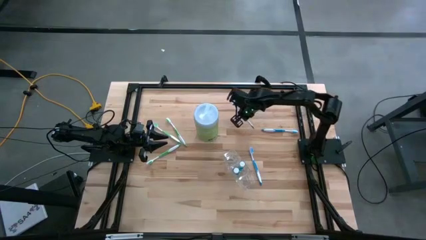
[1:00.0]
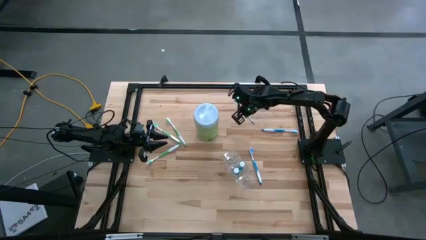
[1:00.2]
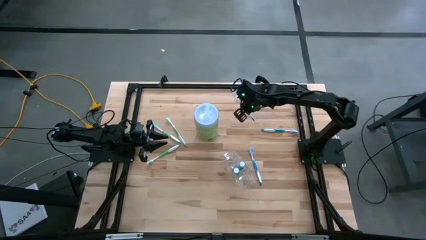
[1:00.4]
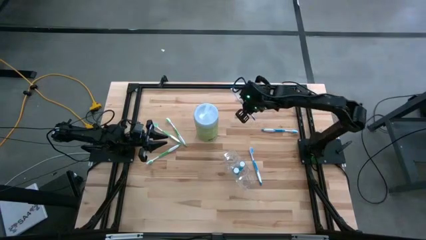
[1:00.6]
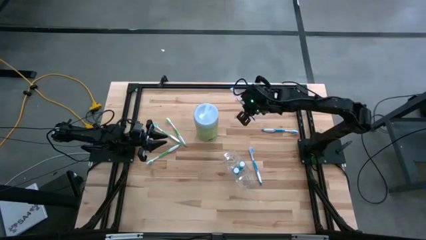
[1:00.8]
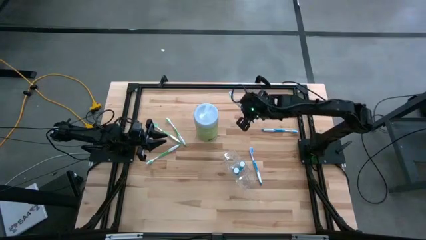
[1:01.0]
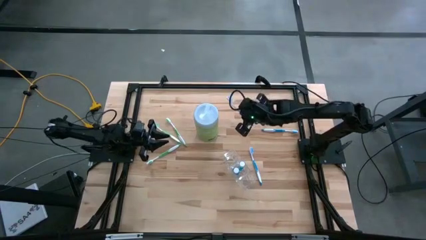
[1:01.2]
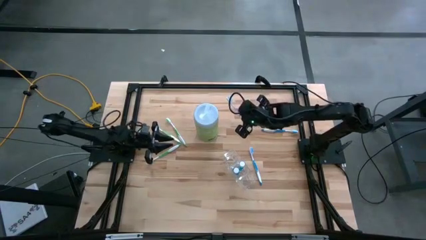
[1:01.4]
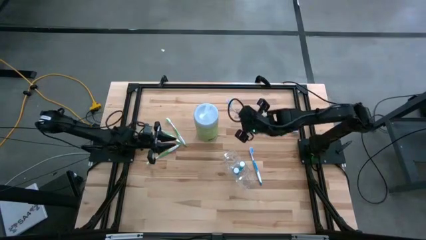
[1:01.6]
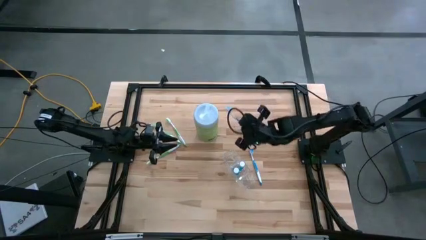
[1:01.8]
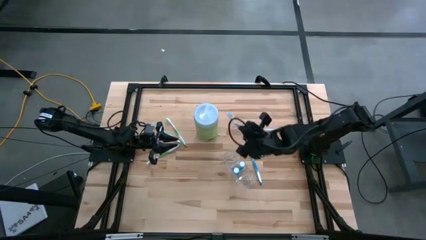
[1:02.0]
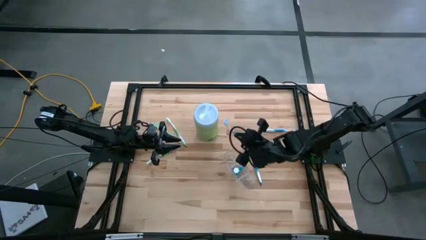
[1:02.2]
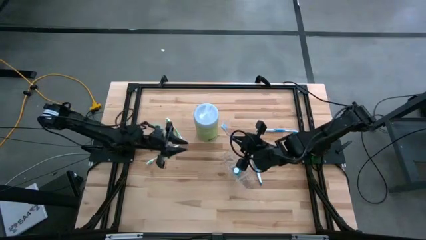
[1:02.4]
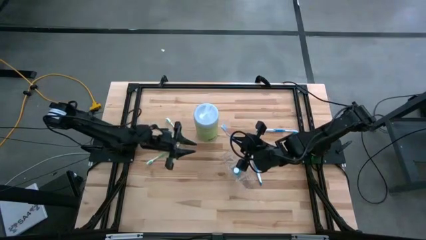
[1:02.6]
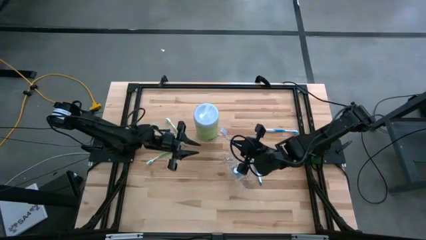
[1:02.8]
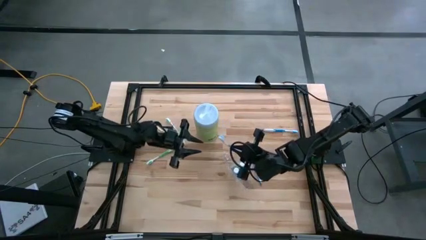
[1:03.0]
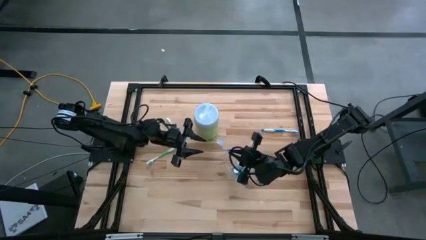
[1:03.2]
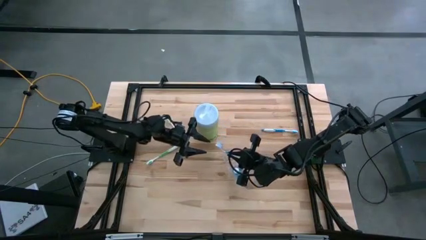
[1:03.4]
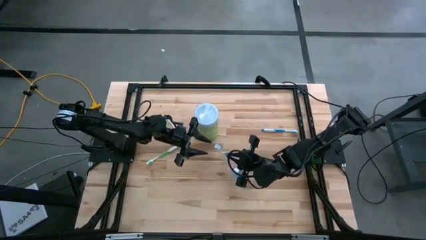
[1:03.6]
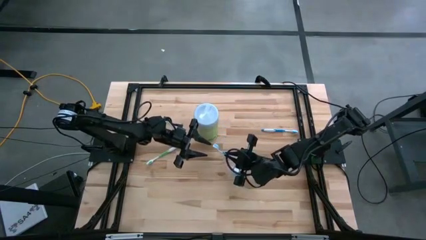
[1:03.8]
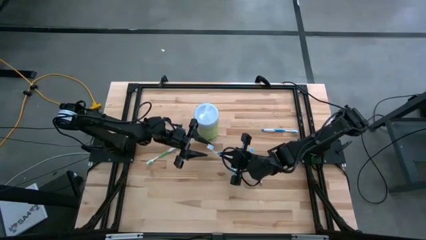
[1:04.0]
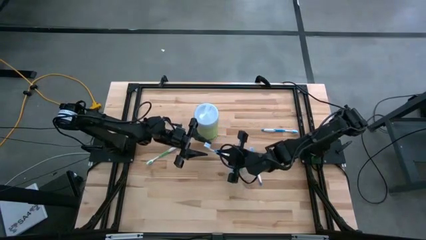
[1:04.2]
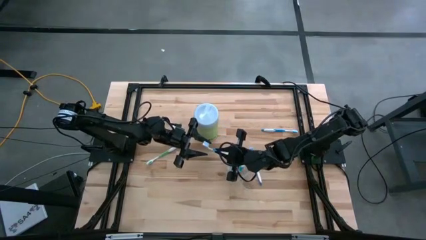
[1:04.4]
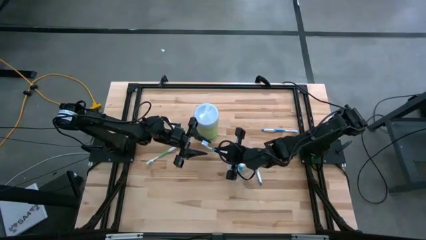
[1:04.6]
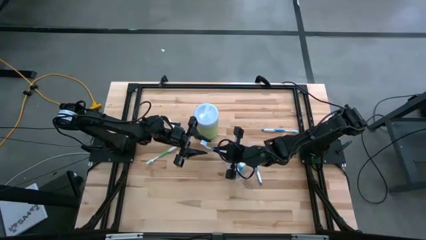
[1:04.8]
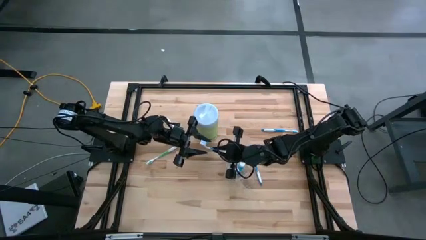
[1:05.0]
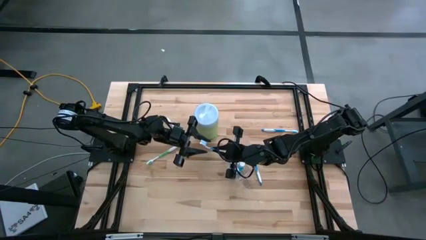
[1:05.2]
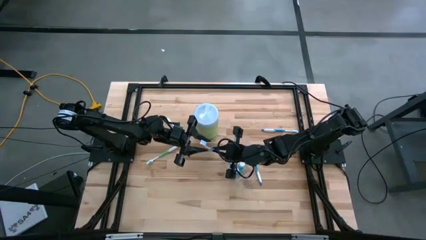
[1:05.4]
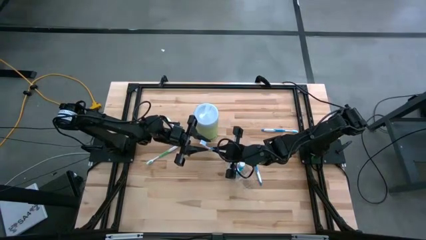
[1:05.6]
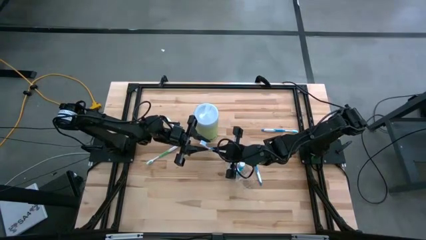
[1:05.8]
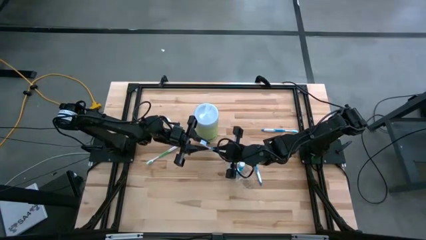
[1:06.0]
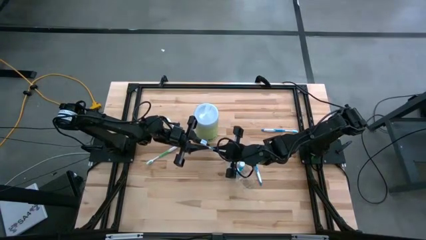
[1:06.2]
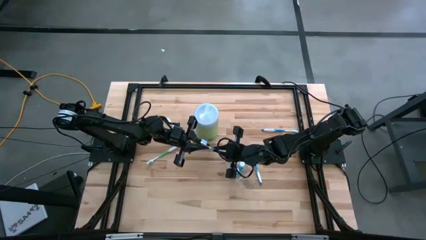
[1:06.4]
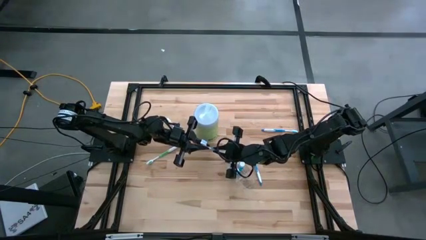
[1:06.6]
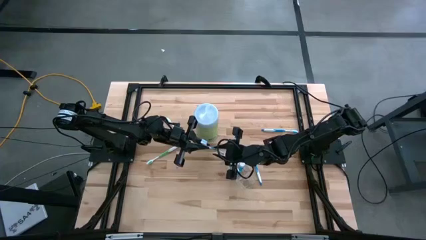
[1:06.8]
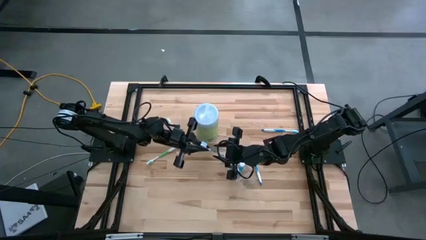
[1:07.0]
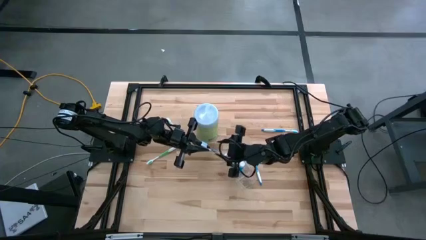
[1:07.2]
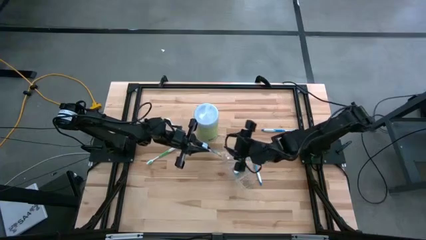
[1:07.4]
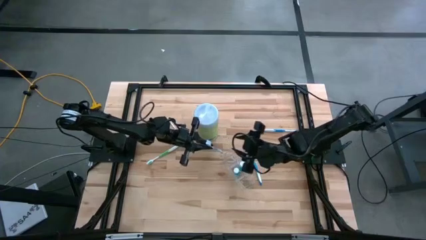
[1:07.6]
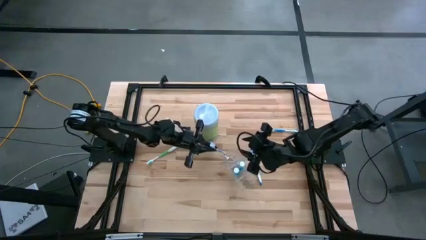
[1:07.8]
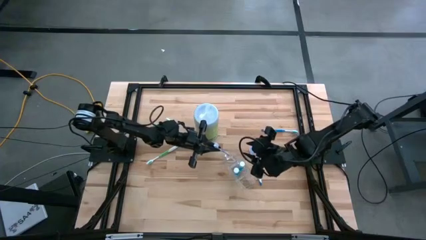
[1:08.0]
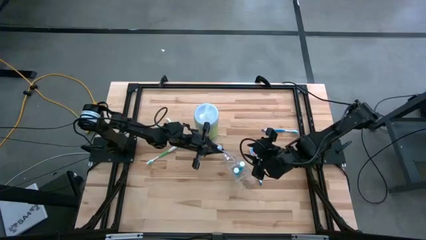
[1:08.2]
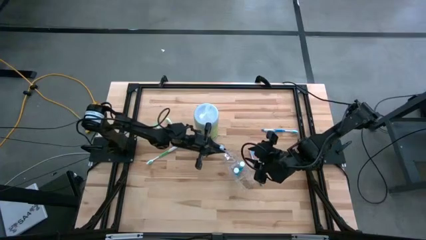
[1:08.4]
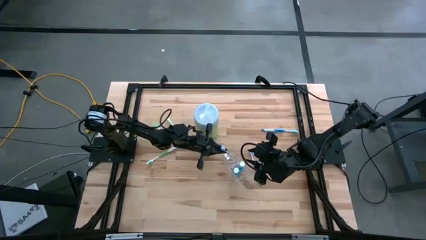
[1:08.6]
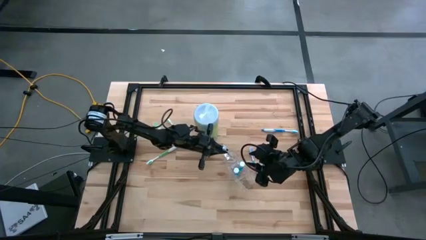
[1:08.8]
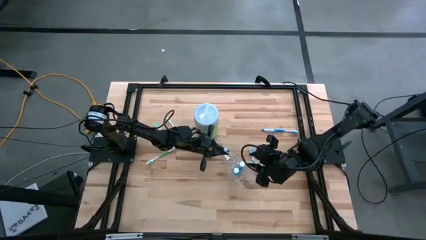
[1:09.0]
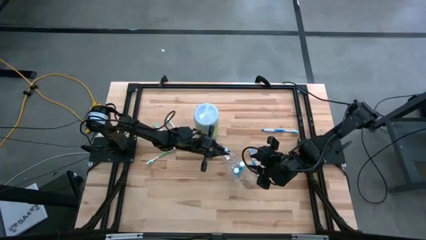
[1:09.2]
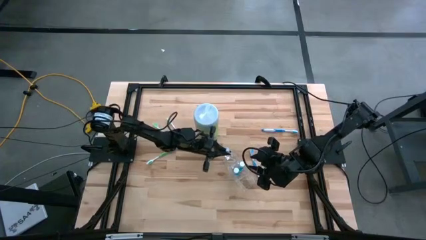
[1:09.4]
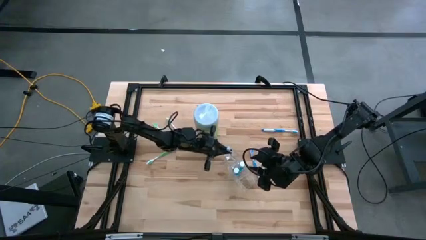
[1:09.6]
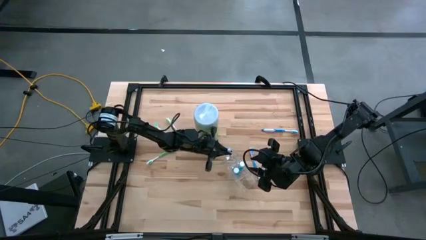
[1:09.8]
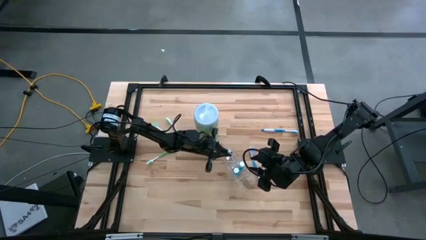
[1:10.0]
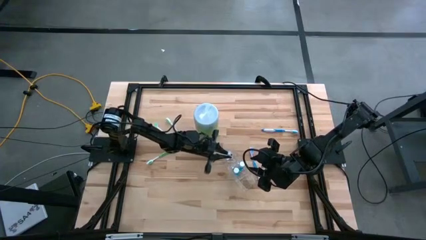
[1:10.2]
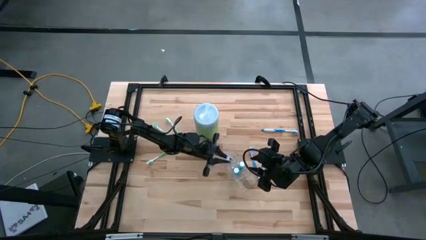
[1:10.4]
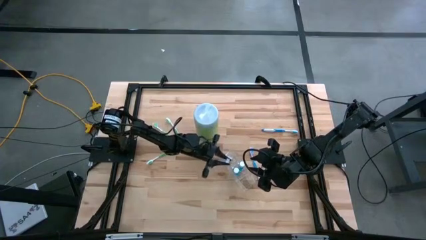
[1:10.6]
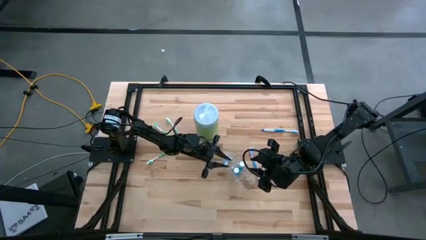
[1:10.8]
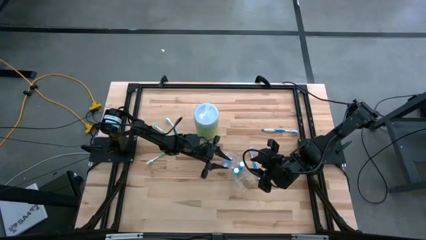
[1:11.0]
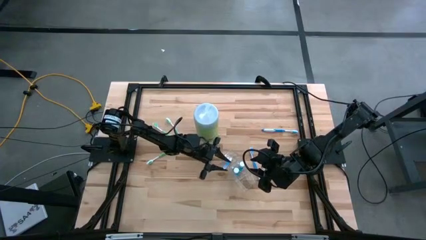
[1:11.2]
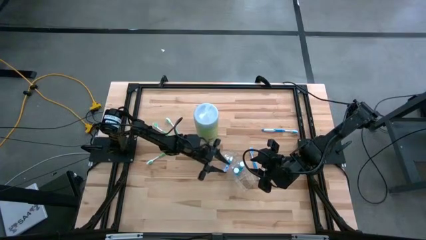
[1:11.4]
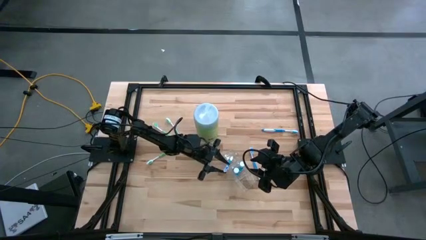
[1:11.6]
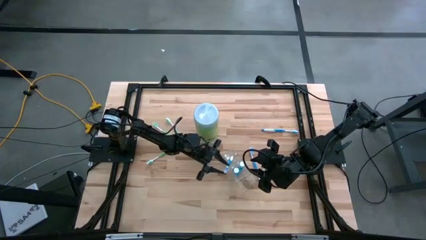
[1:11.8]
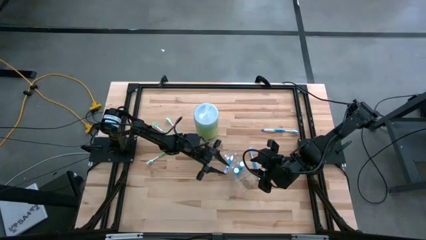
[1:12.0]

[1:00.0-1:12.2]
Task: Pick & Place toothbrushing station
Put the top left blue toothbrush into the transparent organizer

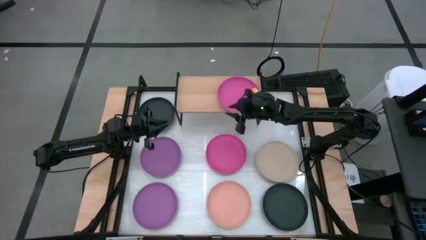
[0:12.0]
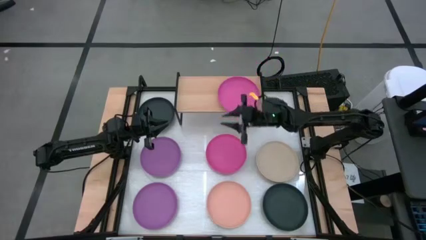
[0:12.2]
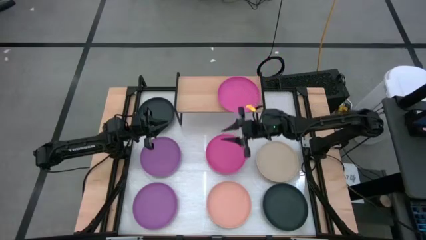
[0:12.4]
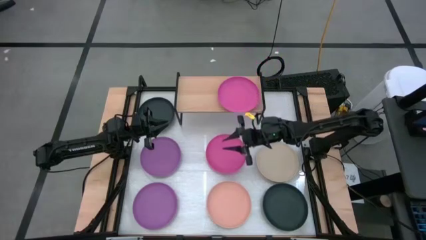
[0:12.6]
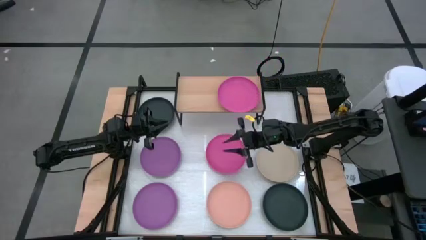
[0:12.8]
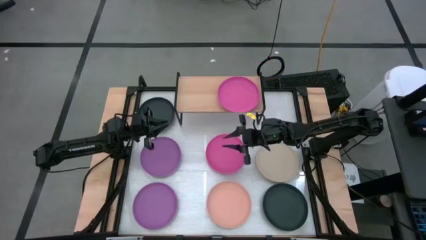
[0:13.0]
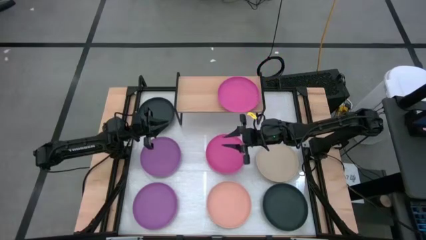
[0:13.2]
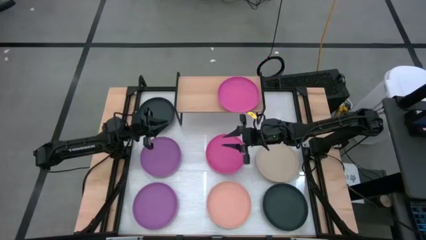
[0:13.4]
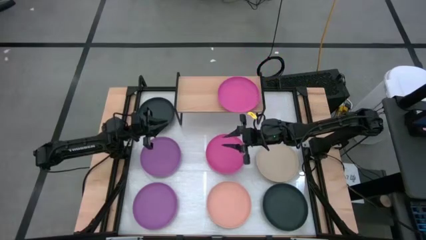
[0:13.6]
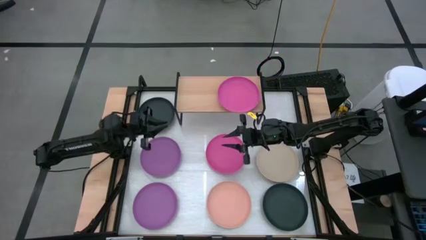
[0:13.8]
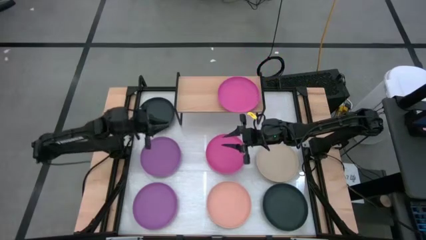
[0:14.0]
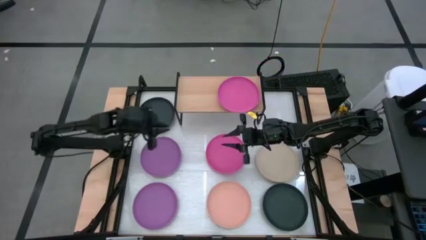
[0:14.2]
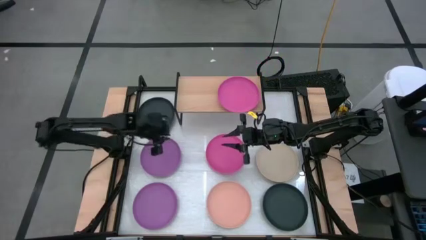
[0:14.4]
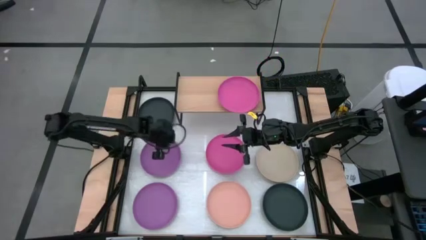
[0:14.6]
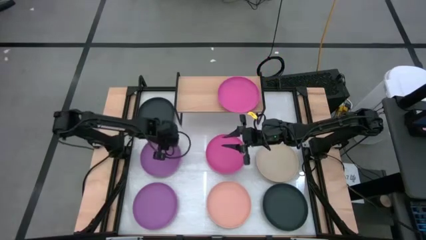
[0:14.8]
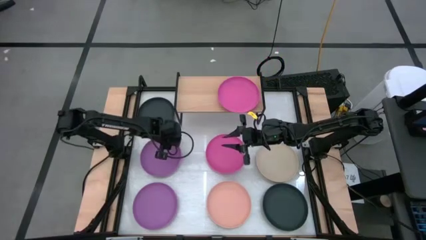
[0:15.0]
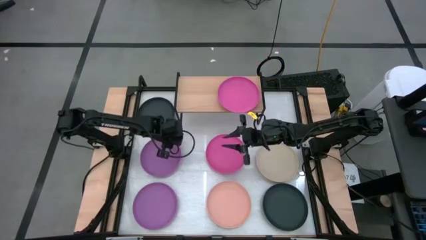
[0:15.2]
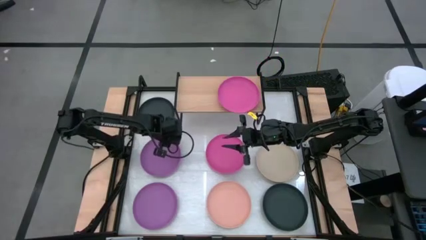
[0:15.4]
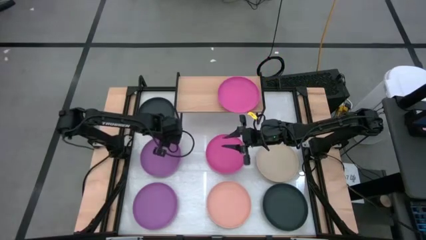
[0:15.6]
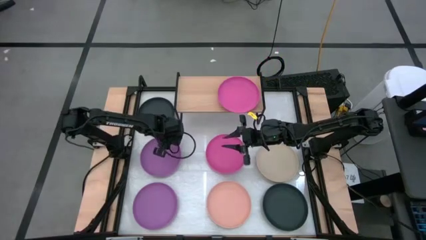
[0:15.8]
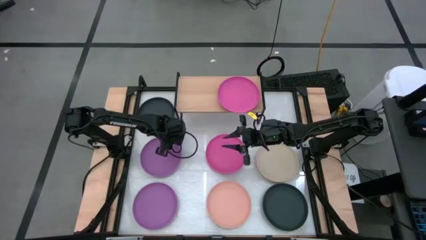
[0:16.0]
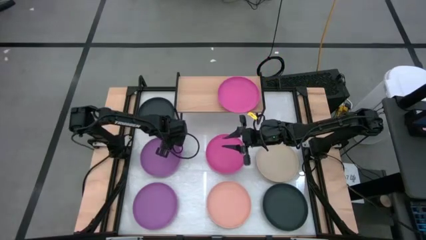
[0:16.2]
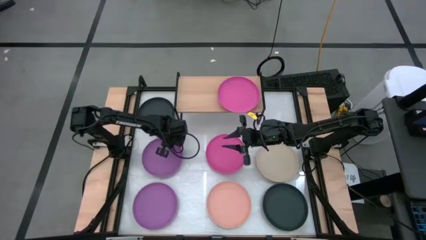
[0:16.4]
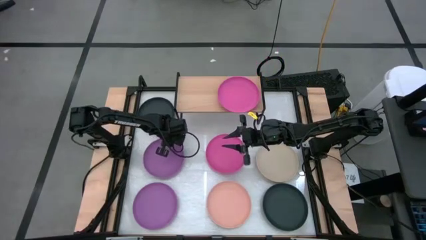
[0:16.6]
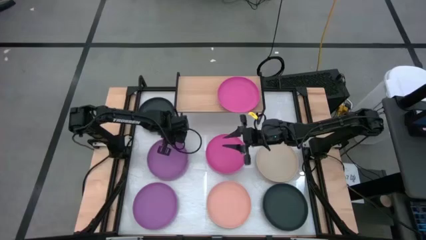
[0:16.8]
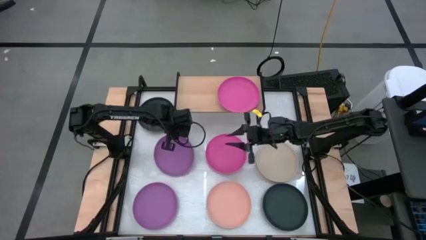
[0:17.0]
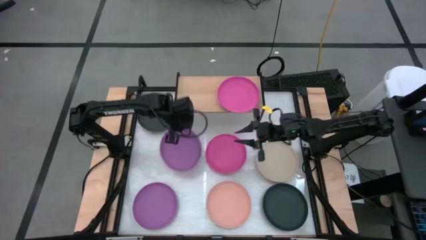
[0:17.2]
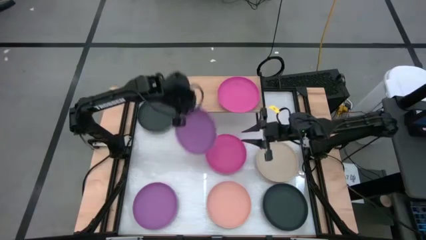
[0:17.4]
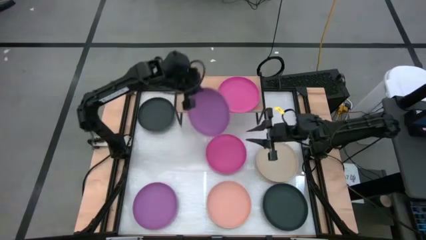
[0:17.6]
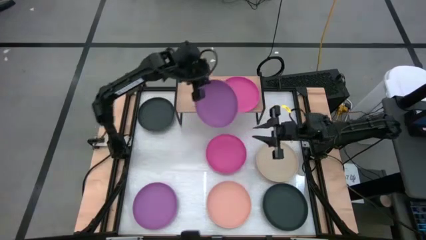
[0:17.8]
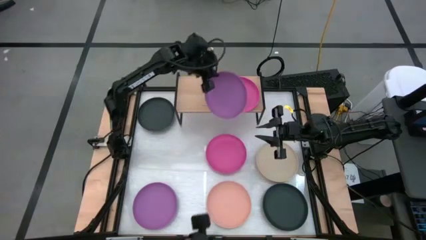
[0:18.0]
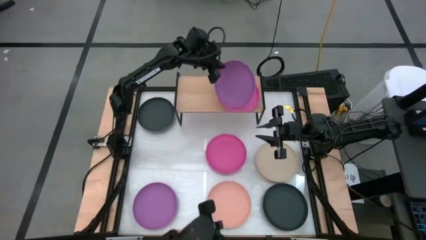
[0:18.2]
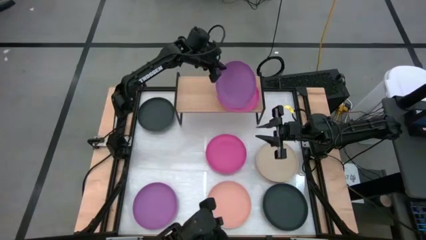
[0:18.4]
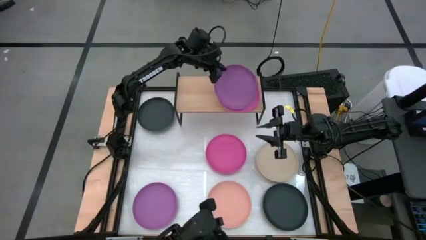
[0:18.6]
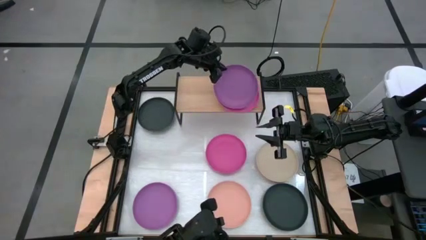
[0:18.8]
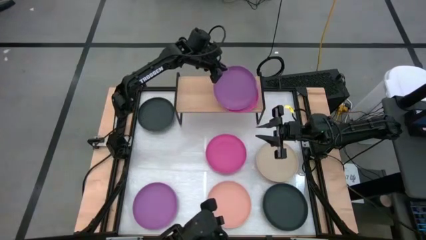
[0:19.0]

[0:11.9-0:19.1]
Task: Place and stack plates onto a shelf
Stack the top violet plate on top of the pink plate on the shelf
